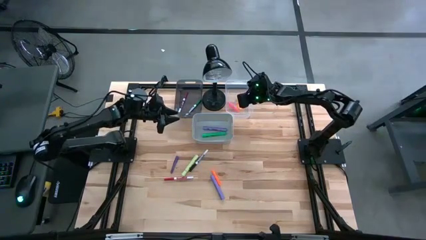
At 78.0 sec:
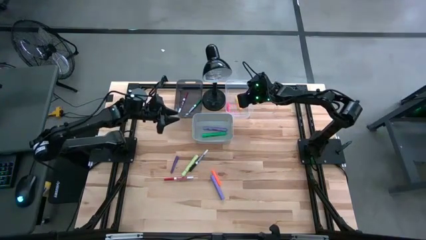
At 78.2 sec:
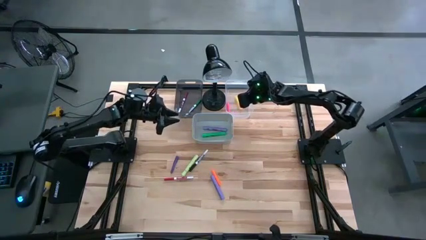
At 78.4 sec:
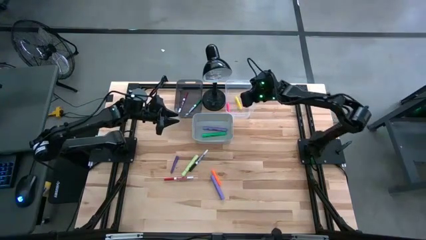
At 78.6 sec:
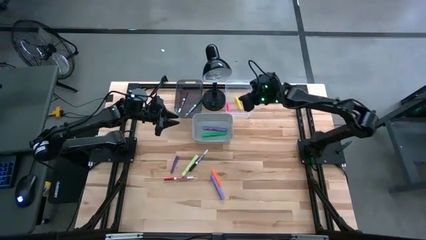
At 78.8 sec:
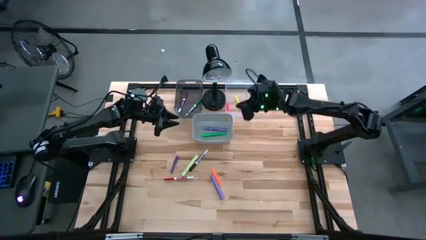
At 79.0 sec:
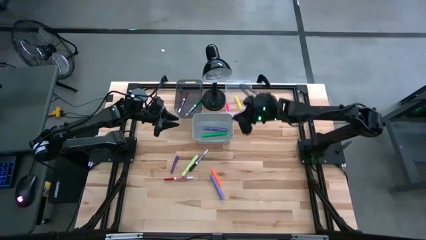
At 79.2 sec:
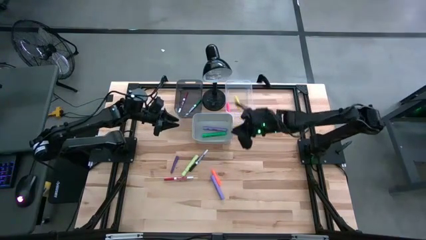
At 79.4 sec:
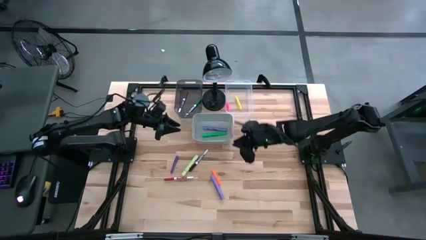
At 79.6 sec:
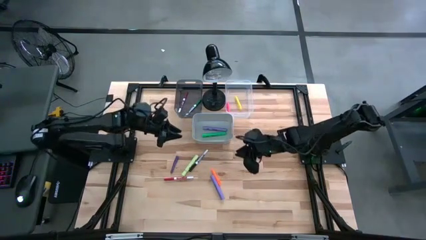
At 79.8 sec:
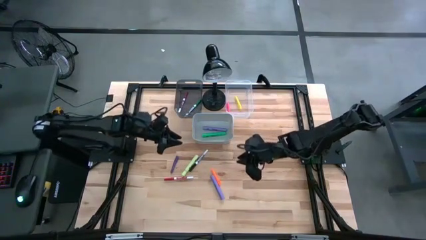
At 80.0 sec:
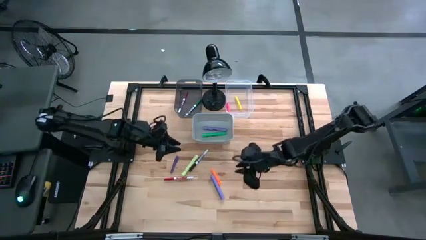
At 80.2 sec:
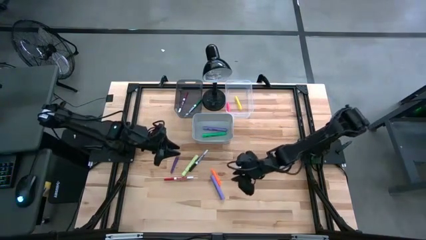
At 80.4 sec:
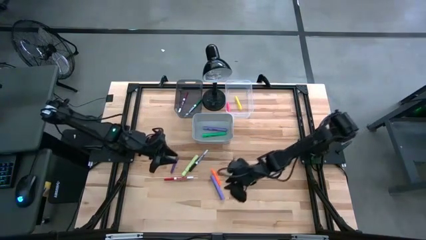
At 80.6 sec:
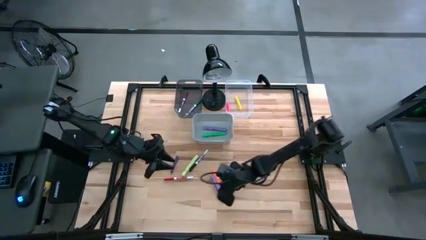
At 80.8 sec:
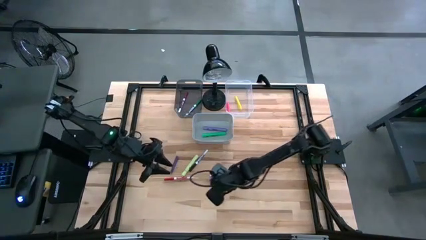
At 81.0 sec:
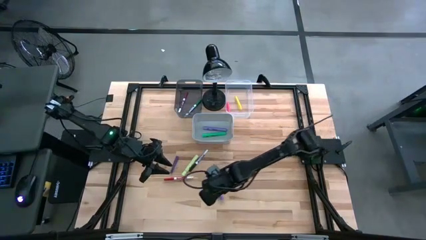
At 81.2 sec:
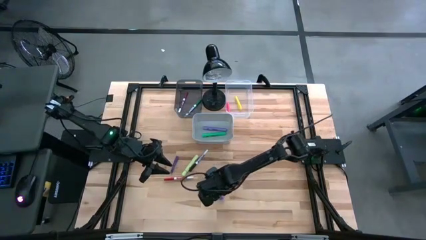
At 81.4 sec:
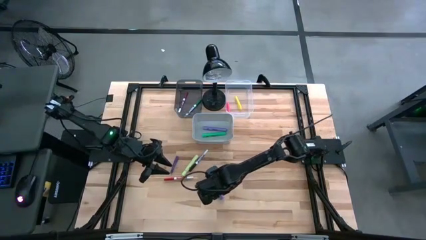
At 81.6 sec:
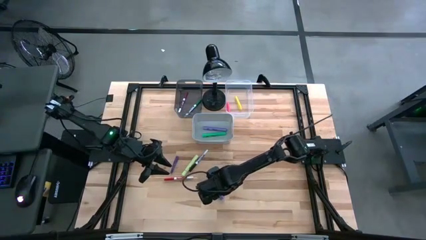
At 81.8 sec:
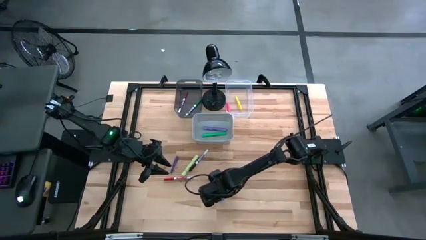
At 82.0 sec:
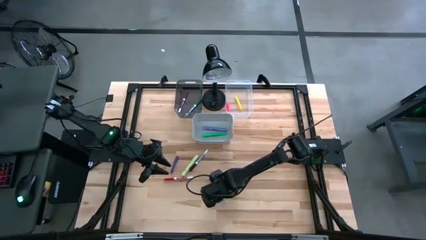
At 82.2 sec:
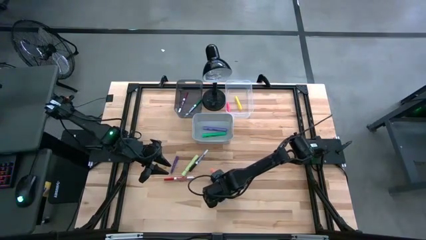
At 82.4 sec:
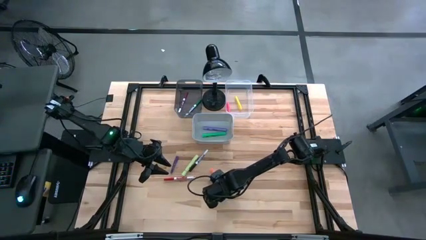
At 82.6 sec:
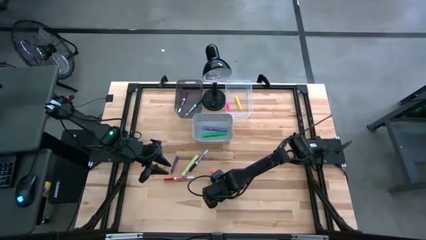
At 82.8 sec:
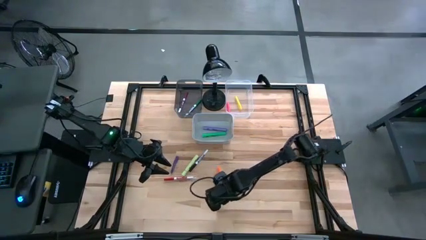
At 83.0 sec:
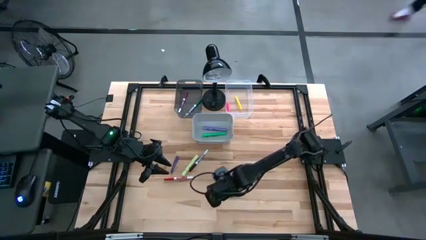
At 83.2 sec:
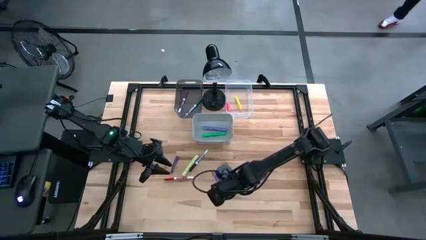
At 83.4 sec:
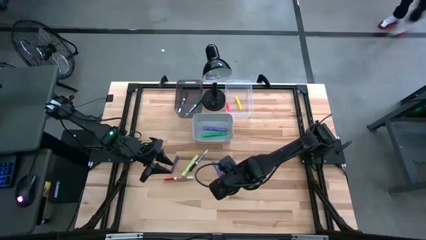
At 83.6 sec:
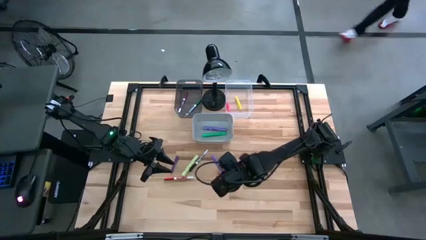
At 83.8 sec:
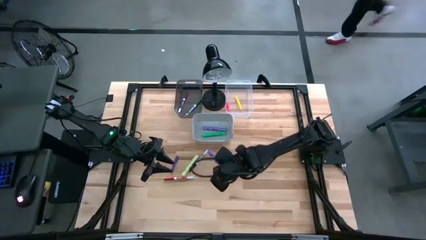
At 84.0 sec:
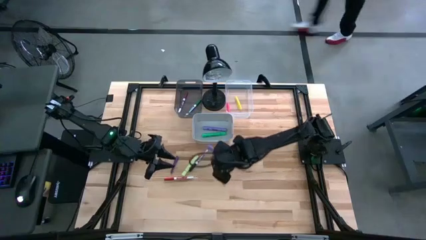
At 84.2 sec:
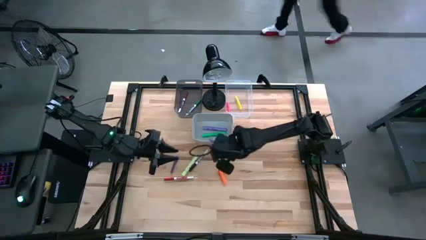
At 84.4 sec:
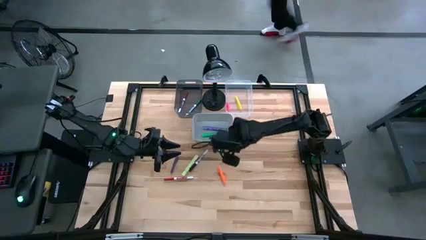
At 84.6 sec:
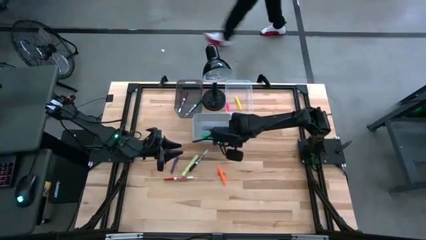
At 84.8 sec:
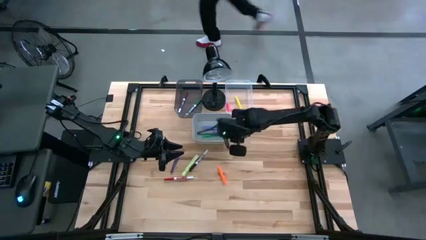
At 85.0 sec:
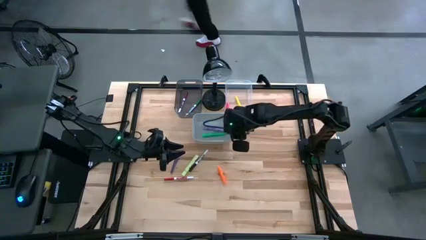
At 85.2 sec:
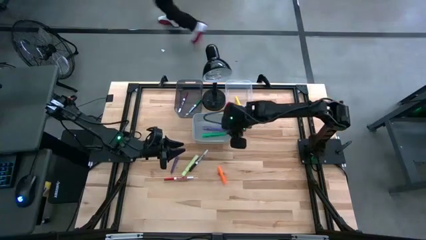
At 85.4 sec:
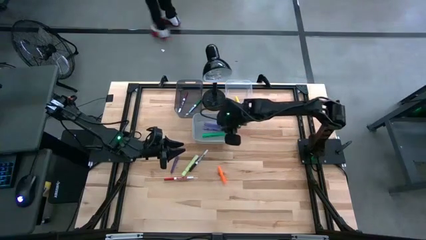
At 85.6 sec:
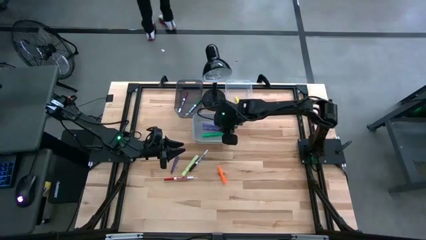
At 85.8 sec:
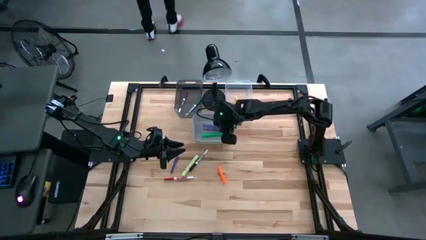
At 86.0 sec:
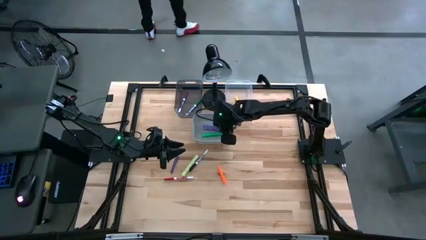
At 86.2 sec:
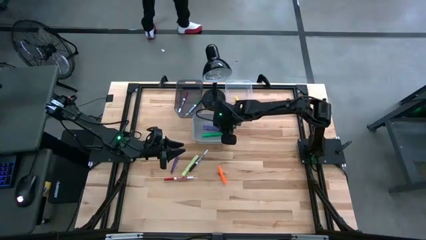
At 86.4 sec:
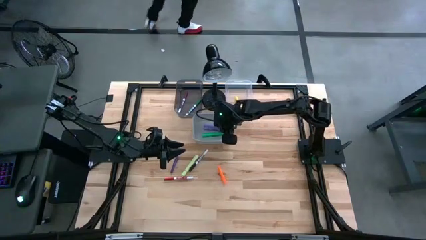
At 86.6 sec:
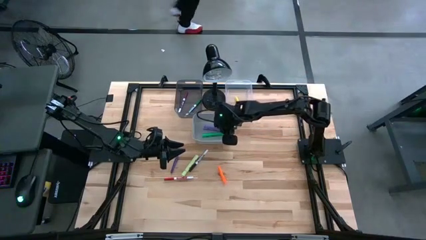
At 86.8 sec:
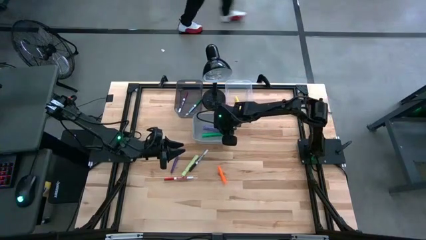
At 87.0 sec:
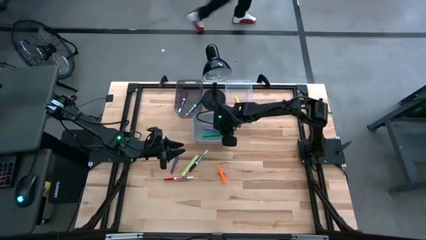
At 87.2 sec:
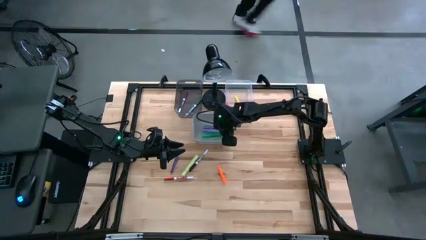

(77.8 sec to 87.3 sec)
Task: Pick & Place Markers
Put the large purple marker into the gray bin

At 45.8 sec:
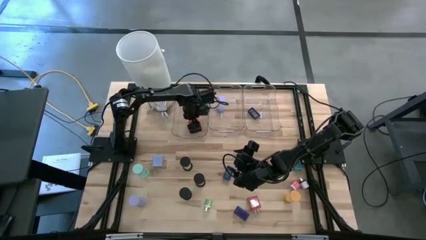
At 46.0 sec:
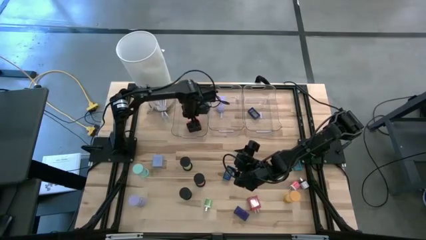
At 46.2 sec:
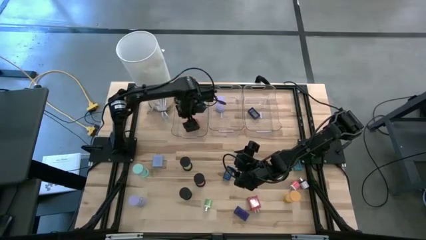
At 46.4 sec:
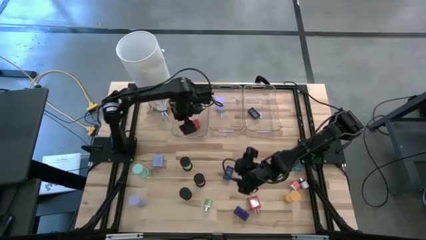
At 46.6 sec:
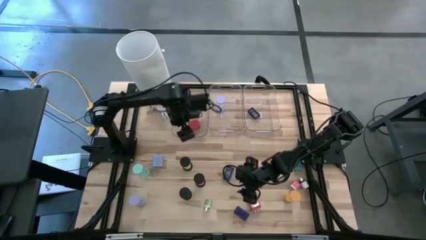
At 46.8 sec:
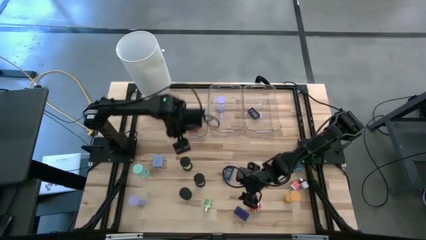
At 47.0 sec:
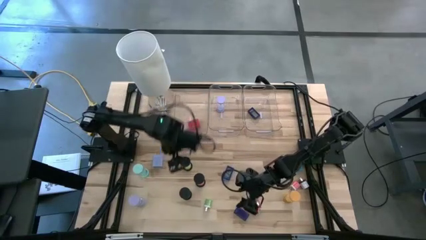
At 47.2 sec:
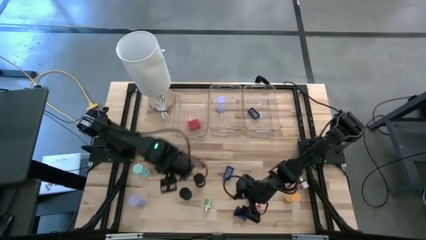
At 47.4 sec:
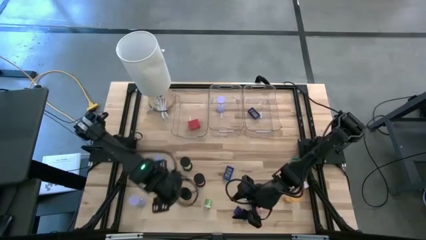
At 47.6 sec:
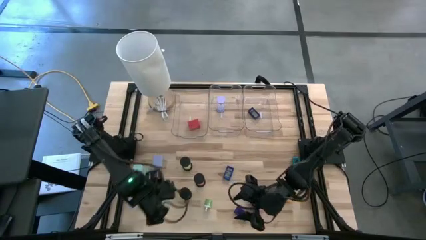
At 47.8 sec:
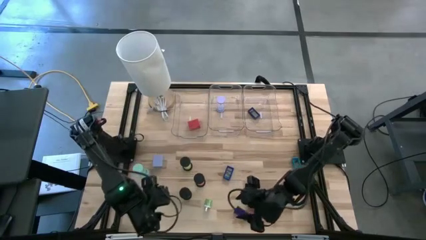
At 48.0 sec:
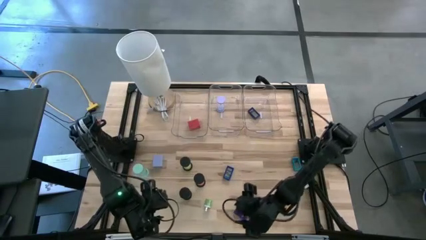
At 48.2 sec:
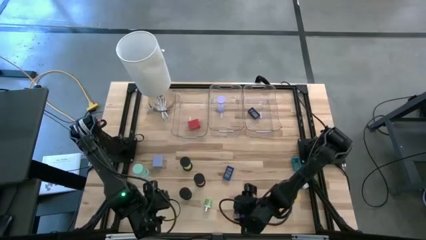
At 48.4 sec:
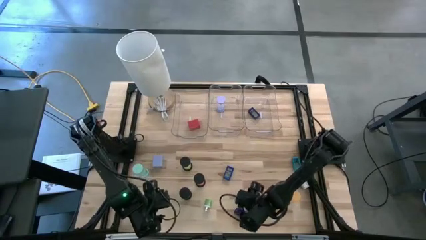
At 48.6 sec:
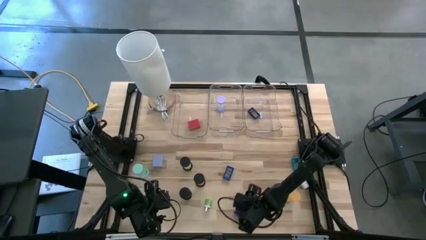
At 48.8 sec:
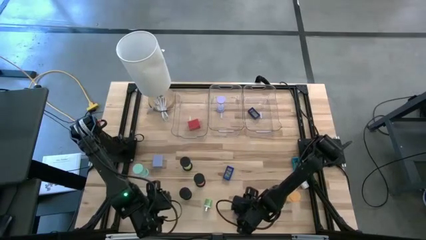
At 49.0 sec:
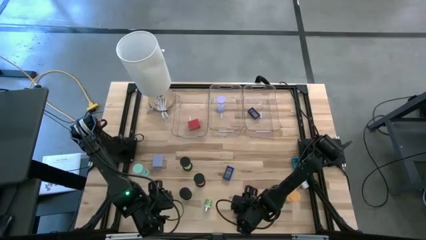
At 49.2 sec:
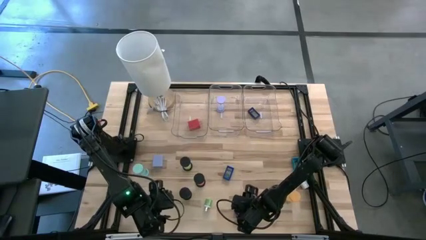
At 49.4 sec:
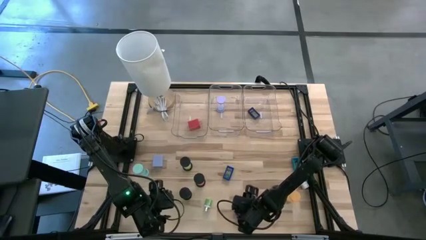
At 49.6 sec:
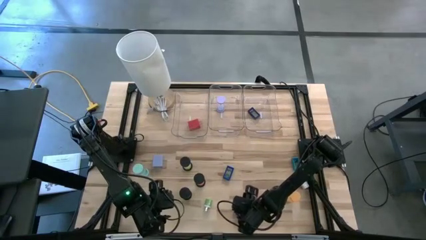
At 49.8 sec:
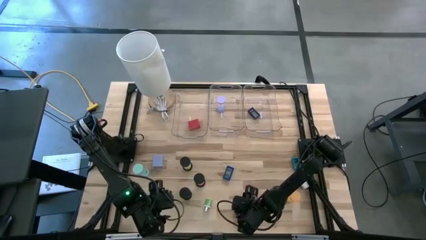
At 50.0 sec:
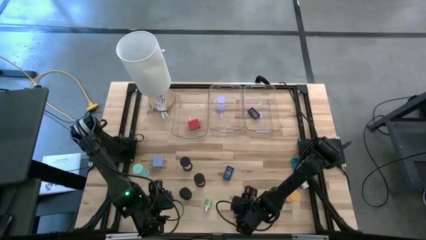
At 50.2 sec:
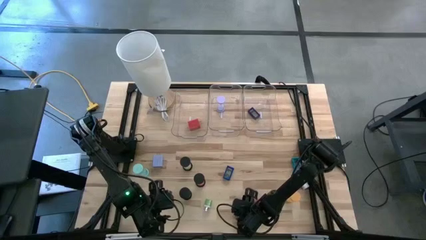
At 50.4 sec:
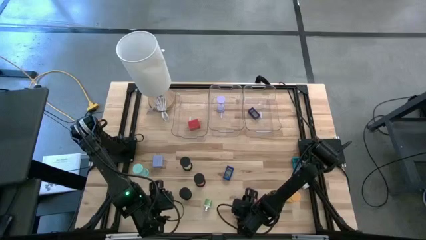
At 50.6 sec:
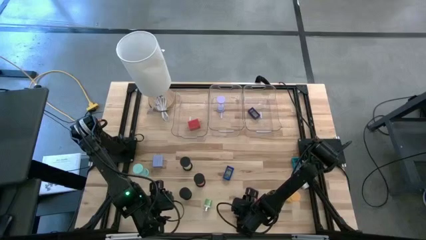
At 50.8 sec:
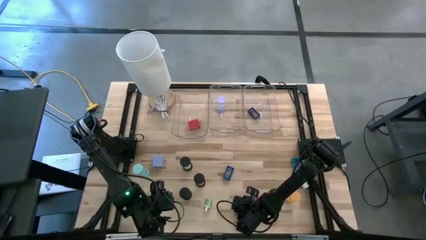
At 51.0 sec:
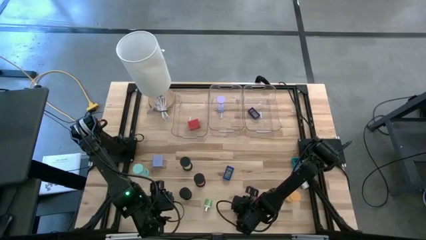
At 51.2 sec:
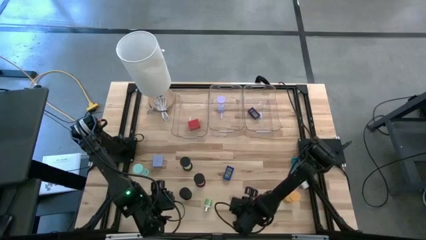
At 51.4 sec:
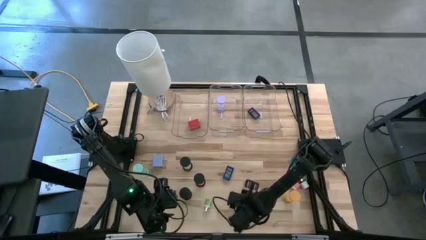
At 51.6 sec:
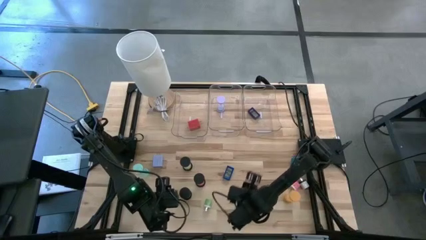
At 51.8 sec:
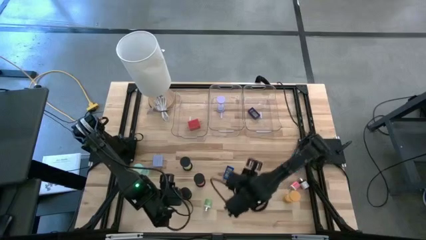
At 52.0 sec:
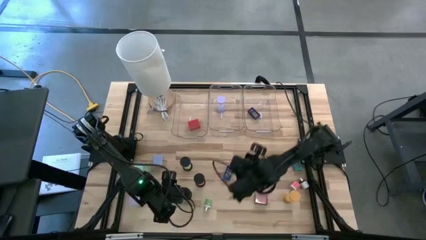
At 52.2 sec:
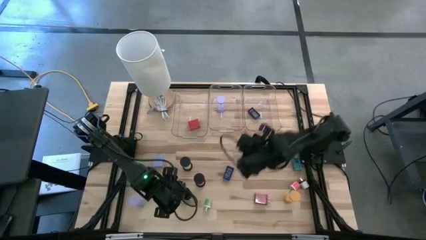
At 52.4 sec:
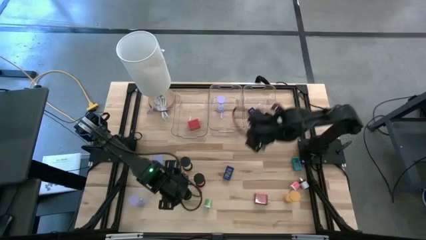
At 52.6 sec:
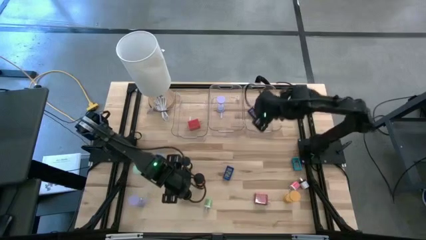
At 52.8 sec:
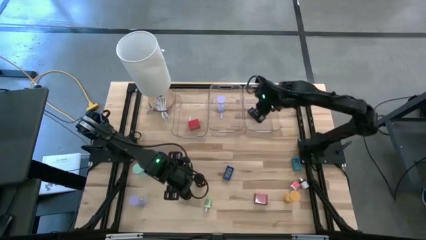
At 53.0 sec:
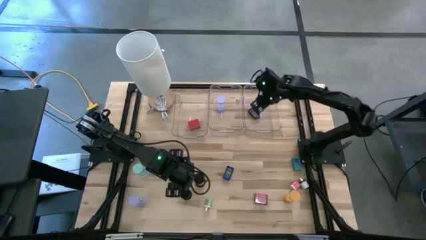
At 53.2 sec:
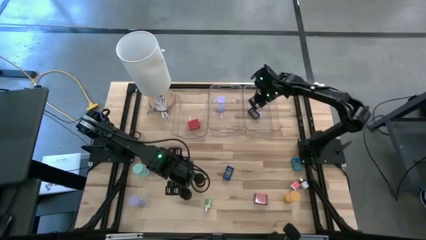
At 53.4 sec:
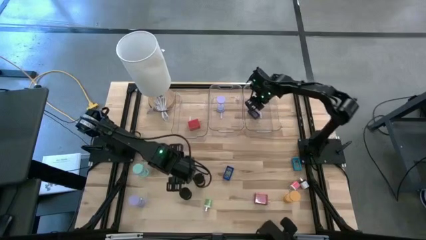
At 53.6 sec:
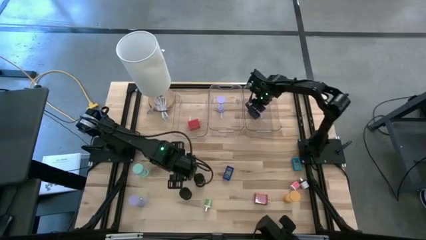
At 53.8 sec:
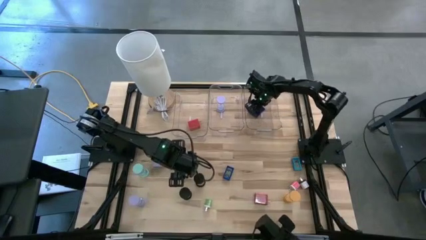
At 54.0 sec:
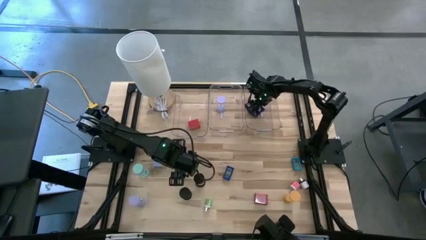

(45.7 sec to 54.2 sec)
Task: Pick & Place Office items
Put the dark blue digital clock into the right transparent bin
